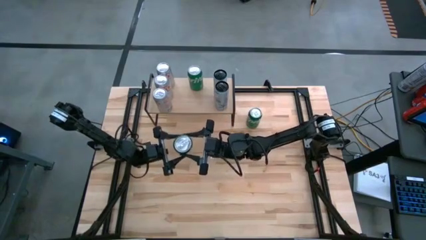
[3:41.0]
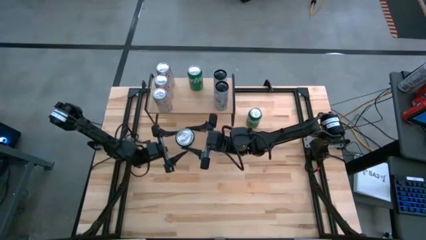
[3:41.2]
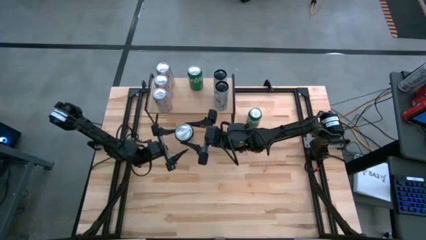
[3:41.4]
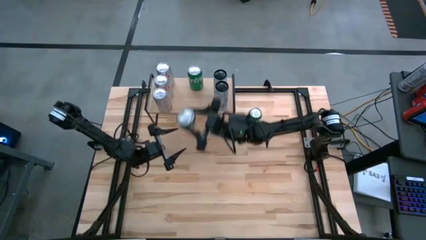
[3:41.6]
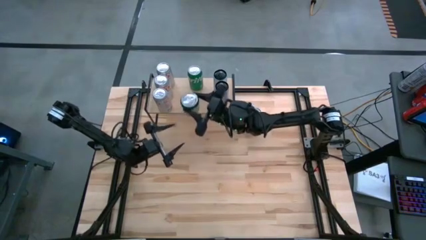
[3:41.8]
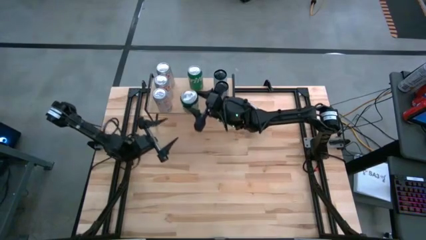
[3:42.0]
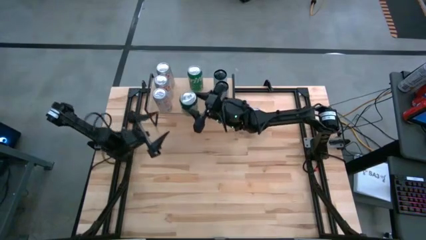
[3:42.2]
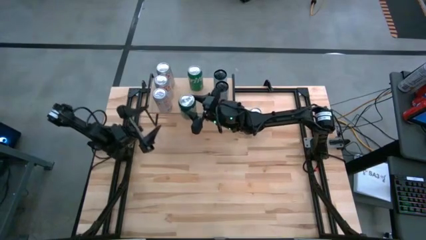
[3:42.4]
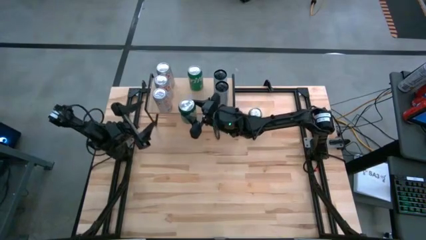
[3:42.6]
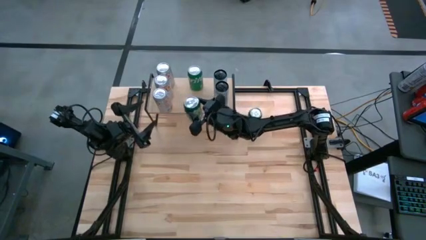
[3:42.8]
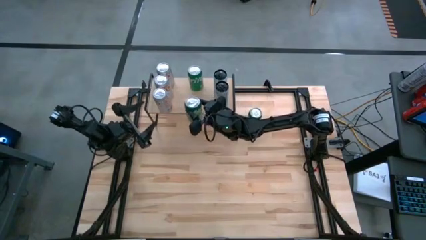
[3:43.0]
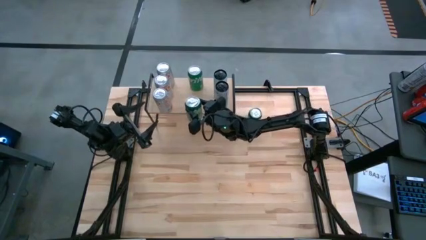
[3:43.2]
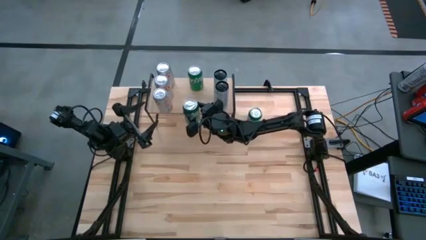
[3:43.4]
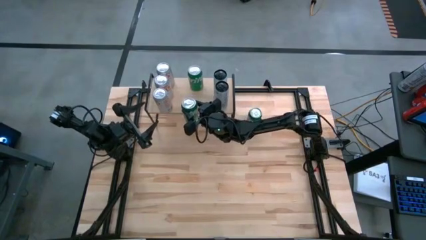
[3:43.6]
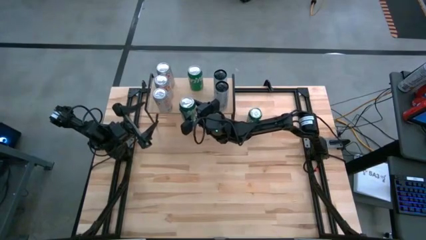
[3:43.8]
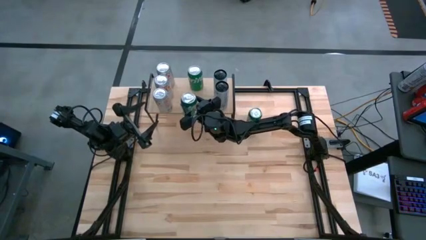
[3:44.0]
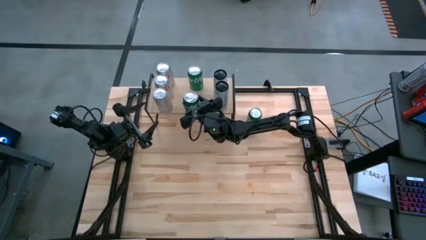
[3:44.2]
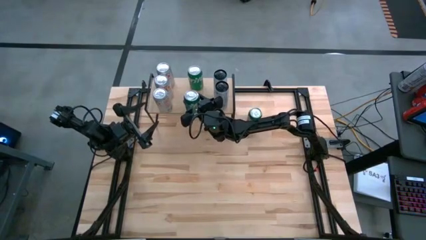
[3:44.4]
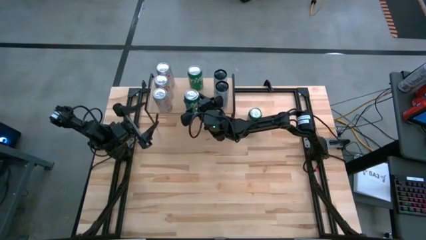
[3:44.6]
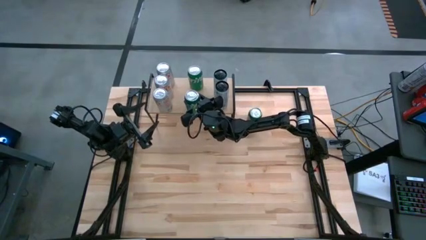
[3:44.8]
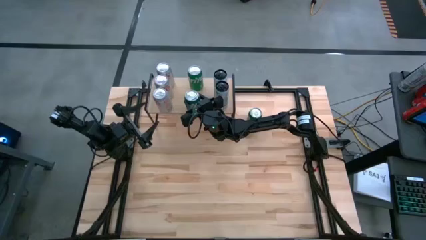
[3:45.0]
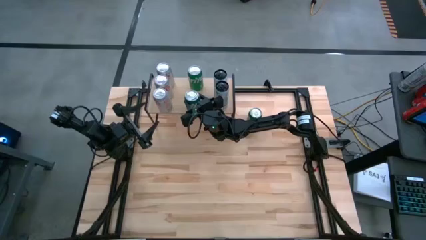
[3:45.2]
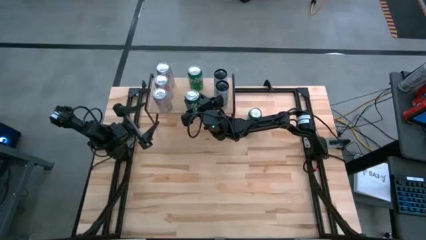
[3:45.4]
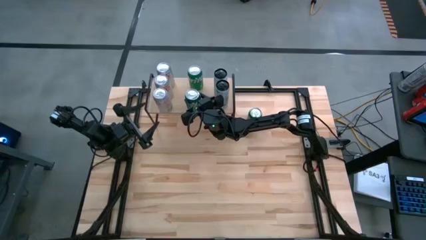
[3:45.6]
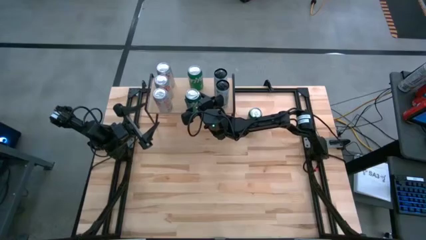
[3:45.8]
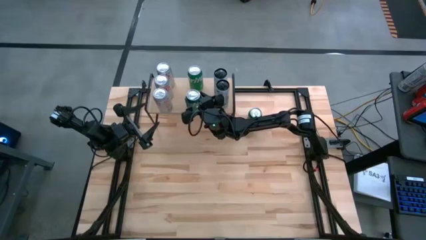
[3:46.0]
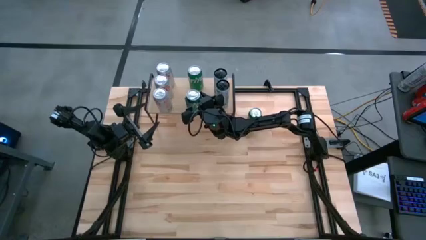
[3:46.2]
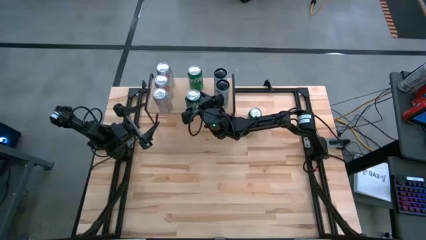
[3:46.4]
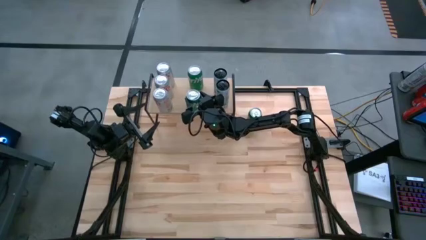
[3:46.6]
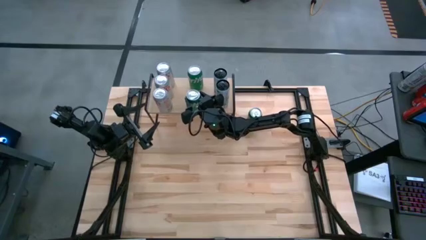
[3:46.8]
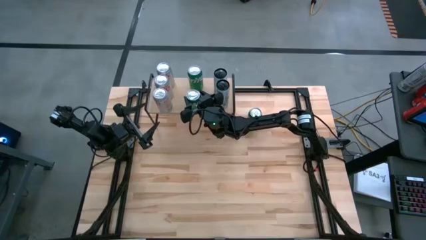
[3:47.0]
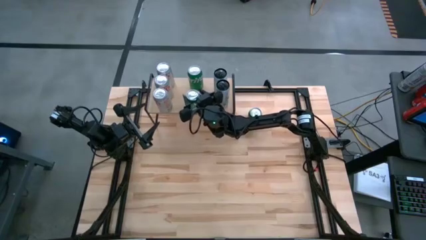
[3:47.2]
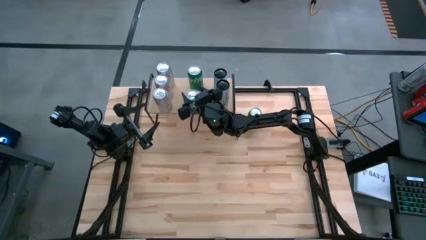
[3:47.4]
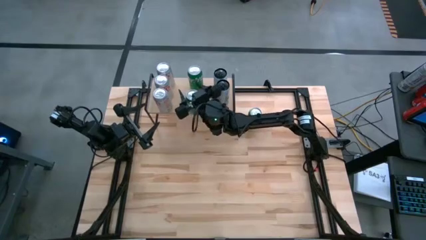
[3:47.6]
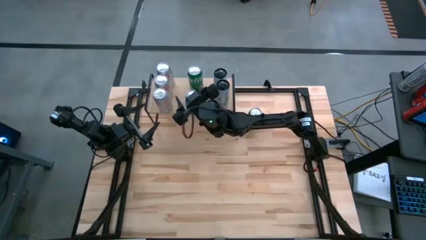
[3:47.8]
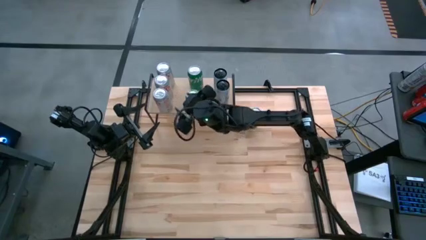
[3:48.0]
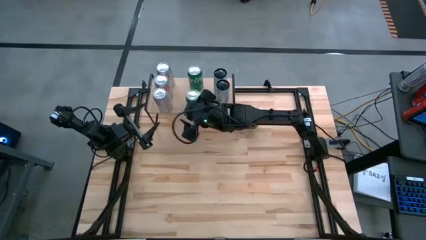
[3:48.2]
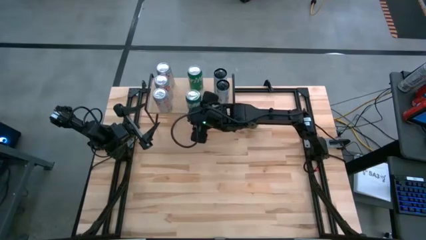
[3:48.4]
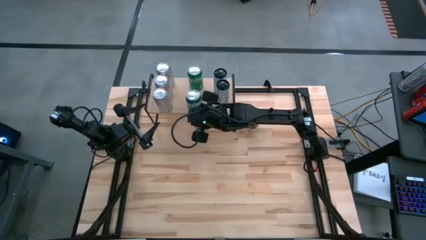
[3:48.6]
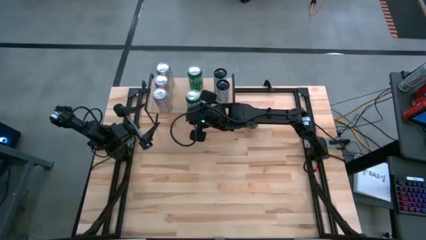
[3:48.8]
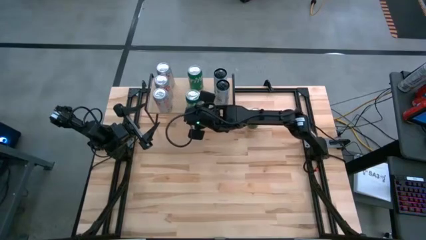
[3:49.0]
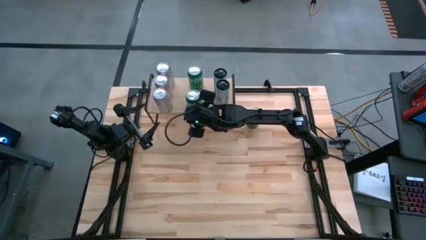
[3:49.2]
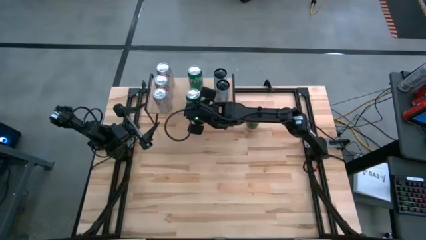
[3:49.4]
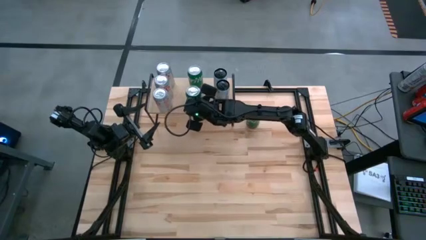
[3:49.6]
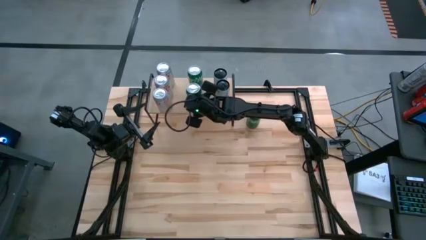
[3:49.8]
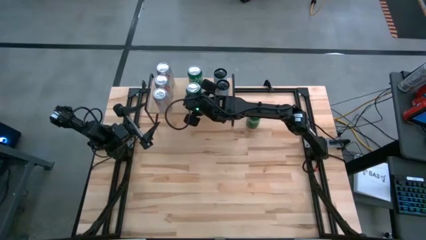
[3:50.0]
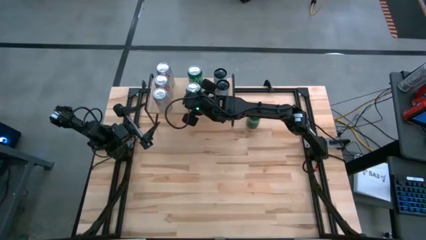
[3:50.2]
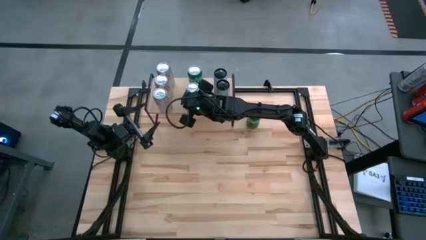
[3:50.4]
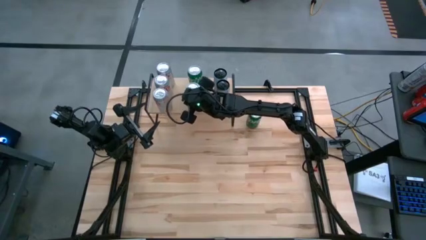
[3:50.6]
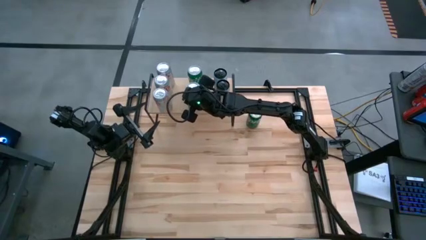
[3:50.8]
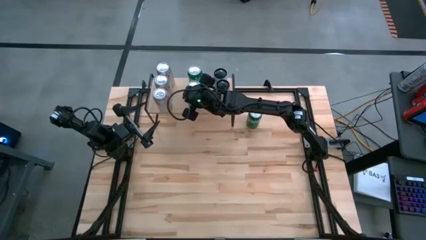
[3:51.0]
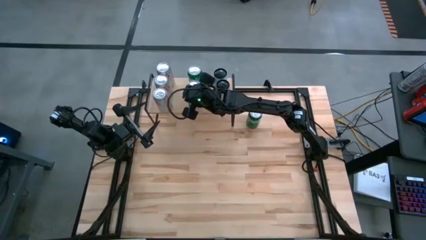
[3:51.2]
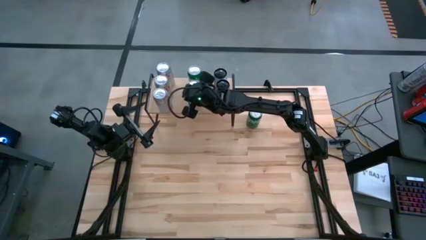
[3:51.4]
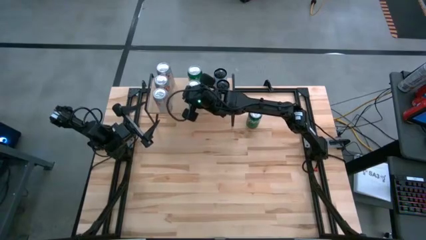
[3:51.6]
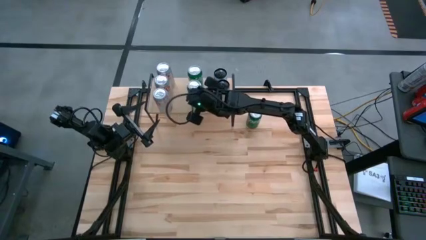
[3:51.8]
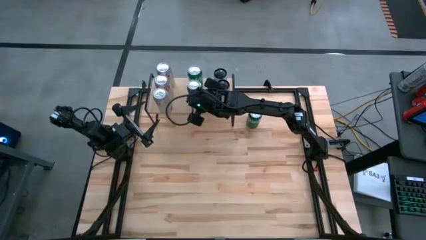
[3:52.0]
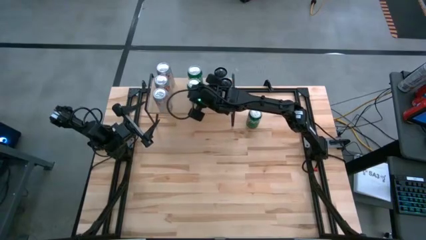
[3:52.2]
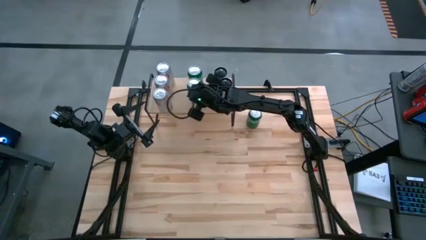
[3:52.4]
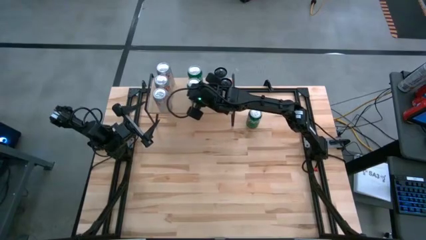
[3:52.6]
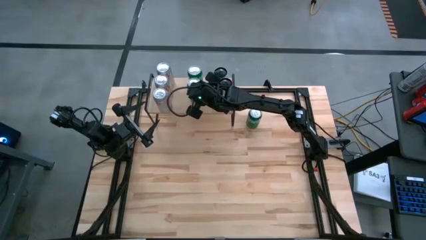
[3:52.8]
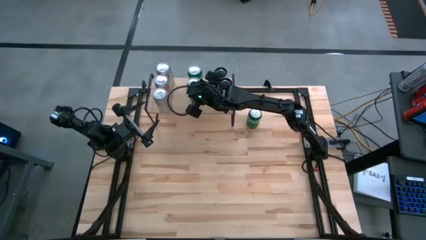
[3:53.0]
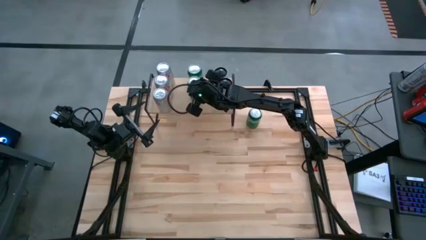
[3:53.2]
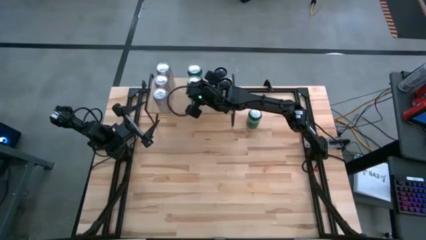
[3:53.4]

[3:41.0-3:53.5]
Task: Place canned beverage on shelf
Put the bottom green soda can aligned with the other soda cans on the shelf

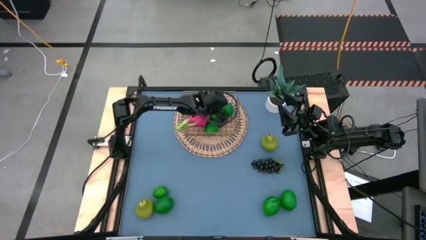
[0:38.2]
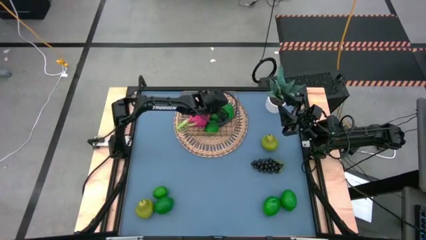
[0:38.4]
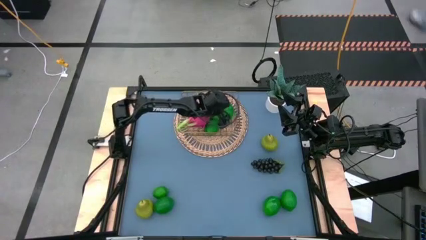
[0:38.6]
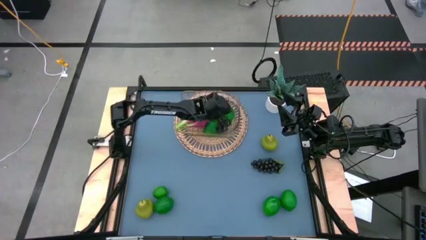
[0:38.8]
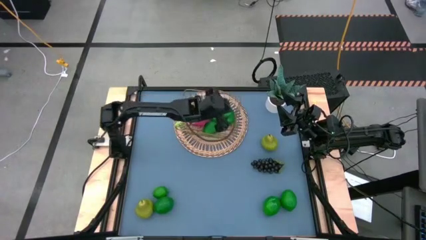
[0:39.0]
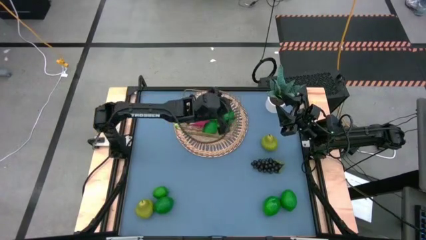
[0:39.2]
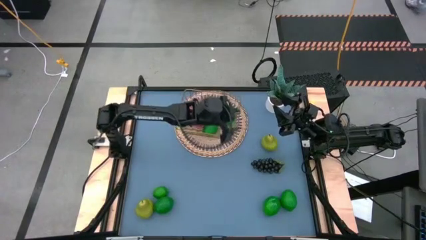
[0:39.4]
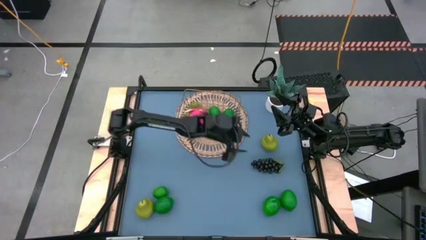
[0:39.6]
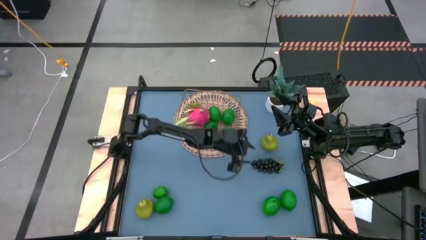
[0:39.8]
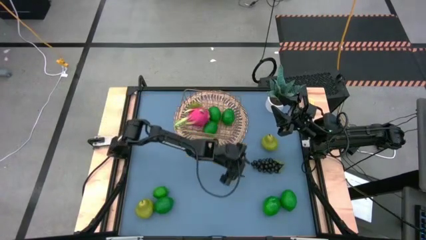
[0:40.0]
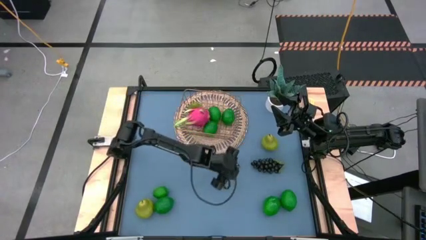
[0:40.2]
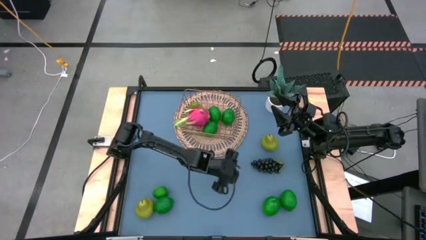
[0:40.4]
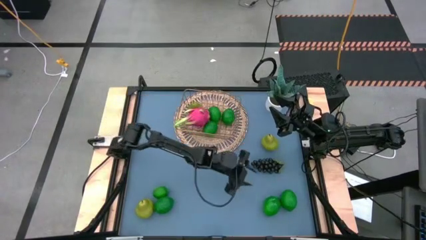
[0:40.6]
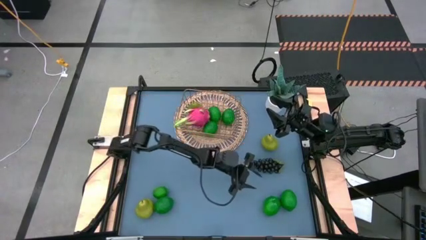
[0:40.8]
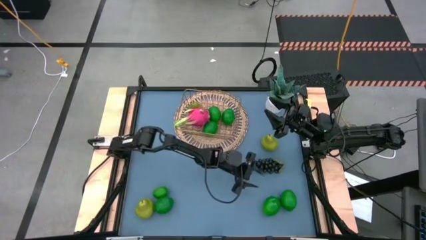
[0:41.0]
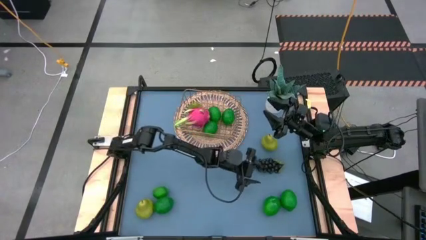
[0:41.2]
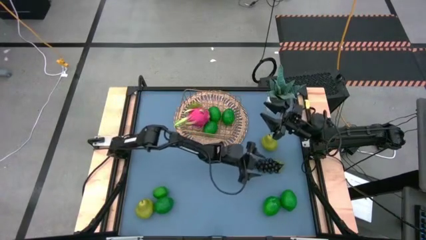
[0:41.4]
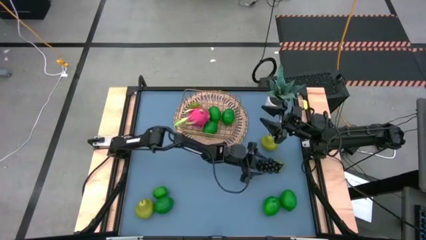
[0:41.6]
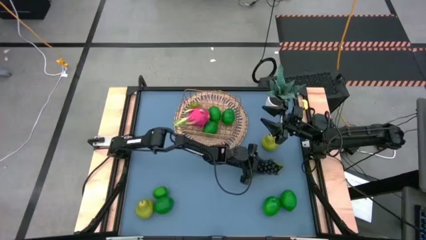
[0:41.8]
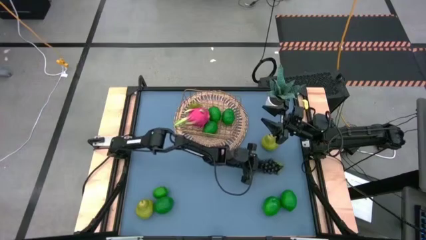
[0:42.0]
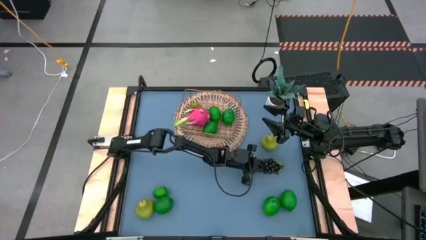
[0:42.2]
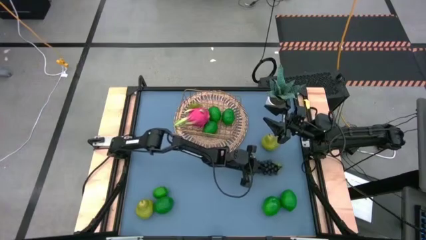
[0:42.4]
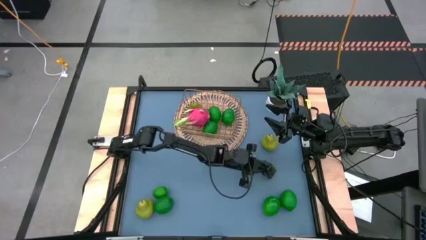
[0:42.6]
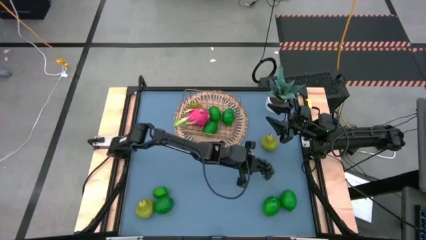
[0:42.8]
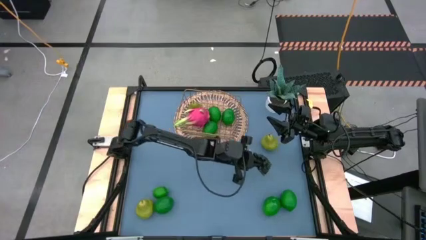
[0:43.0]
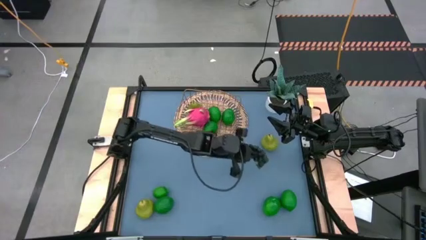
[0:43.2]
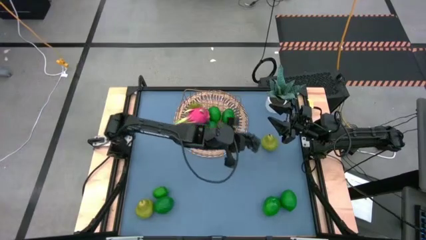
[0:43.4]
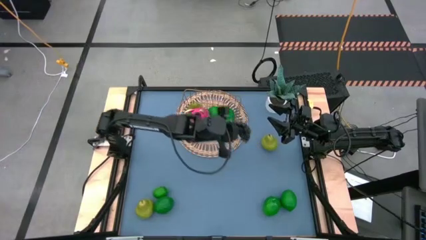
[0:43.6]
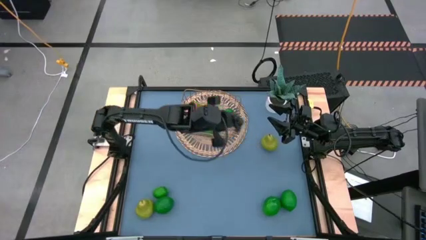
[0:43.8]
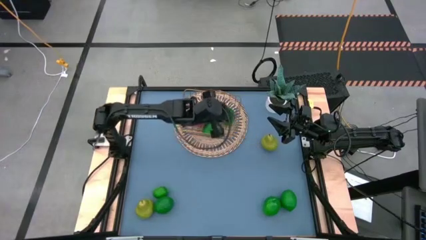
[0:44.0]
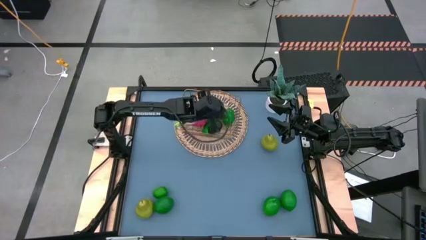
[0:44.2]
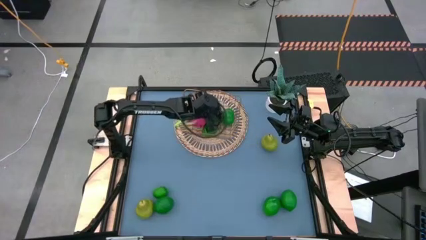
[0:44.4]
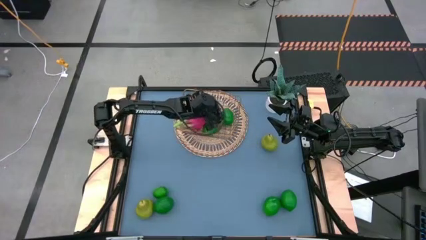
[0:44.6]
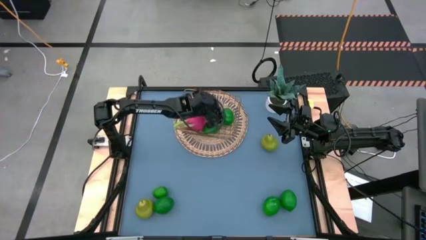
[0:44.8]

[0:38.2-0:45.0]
Task: Build produce basket
Put the black grapes into the gold wire basket
